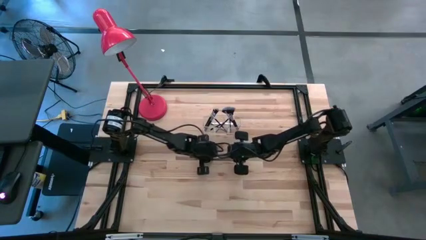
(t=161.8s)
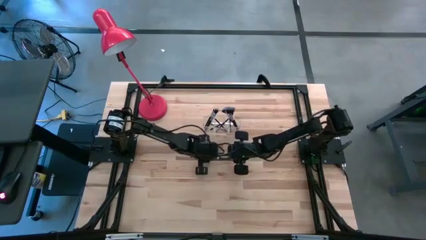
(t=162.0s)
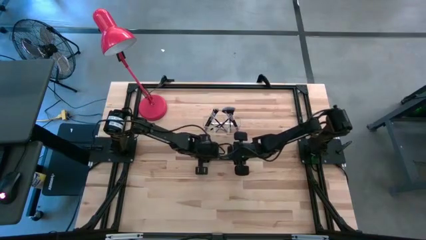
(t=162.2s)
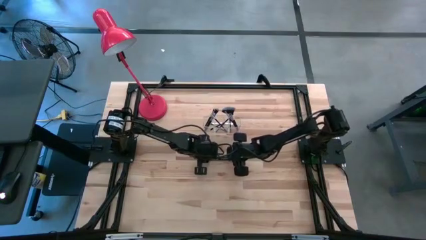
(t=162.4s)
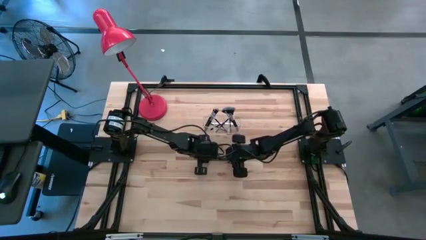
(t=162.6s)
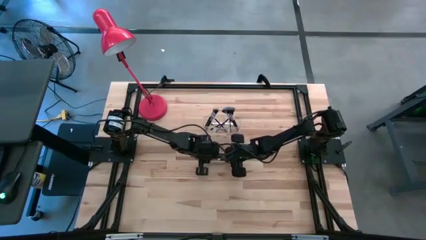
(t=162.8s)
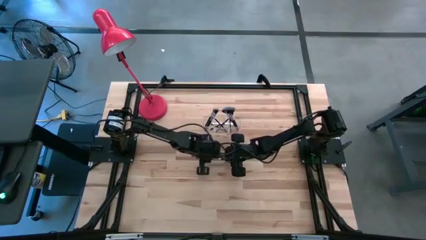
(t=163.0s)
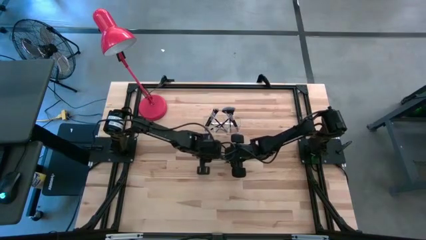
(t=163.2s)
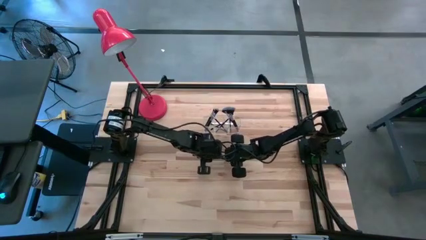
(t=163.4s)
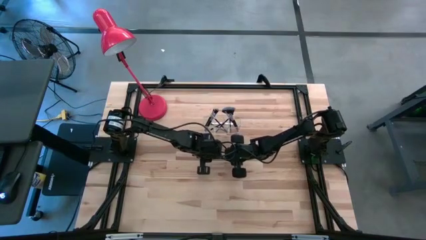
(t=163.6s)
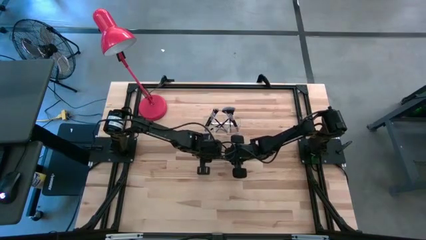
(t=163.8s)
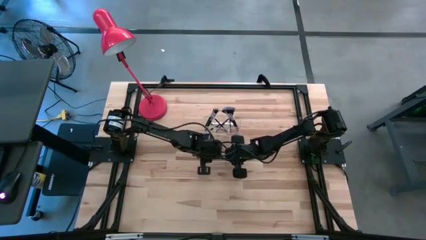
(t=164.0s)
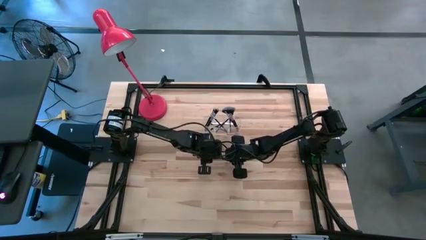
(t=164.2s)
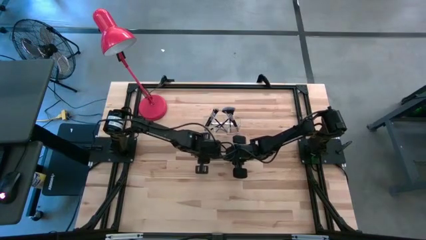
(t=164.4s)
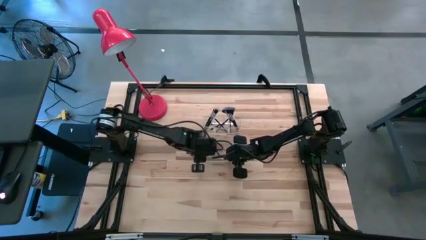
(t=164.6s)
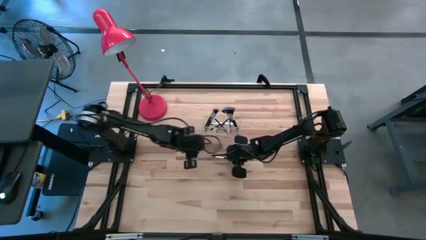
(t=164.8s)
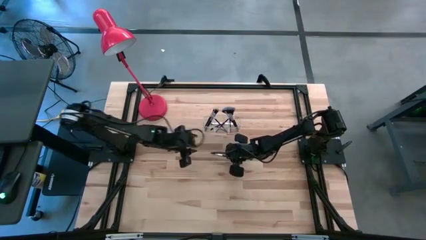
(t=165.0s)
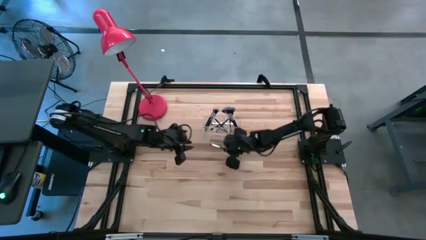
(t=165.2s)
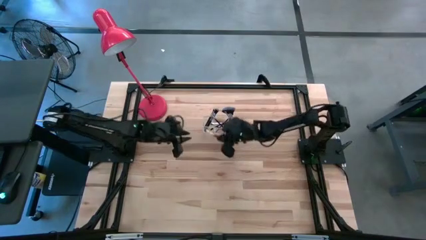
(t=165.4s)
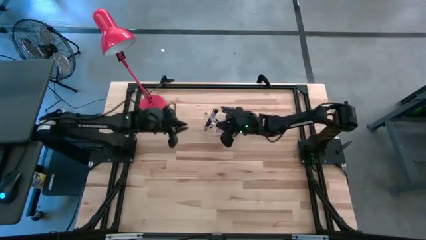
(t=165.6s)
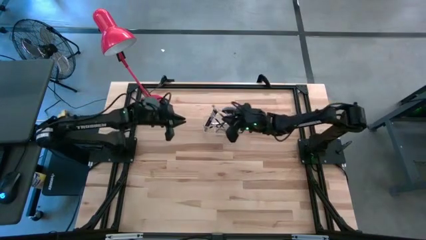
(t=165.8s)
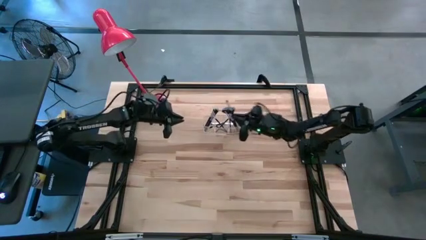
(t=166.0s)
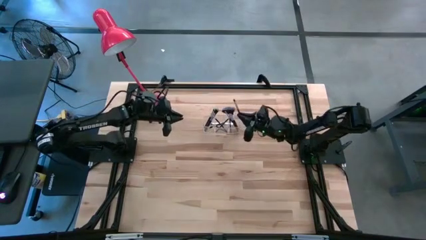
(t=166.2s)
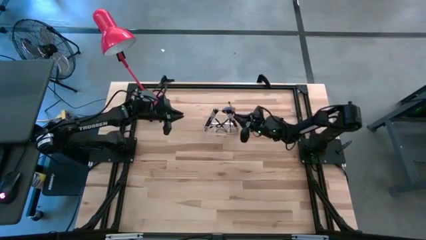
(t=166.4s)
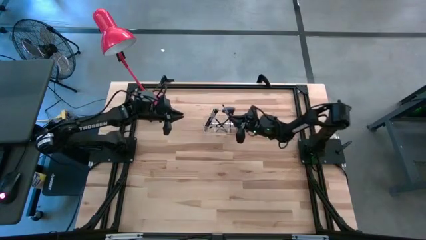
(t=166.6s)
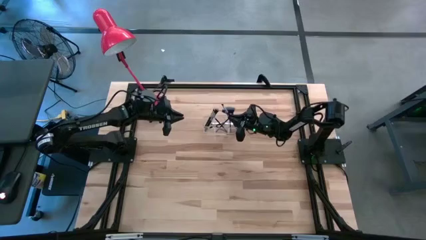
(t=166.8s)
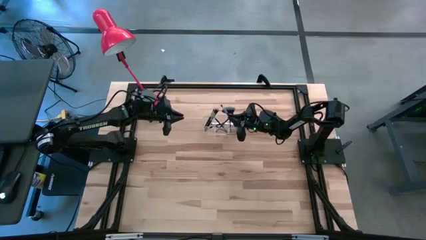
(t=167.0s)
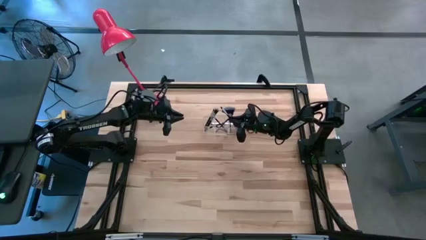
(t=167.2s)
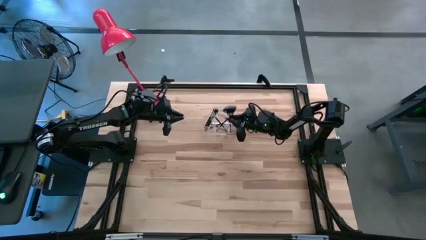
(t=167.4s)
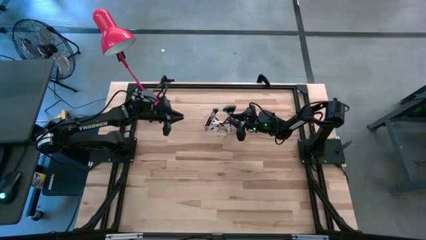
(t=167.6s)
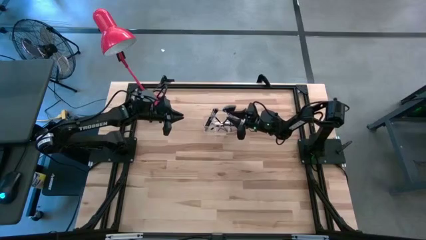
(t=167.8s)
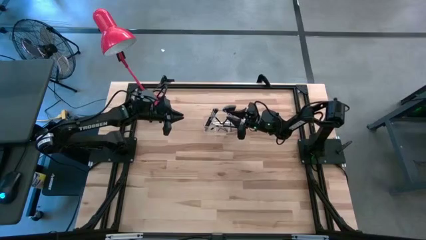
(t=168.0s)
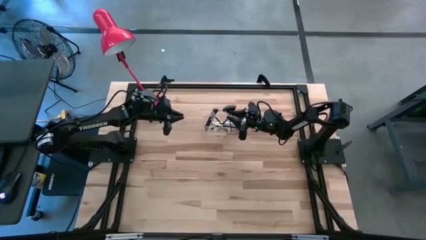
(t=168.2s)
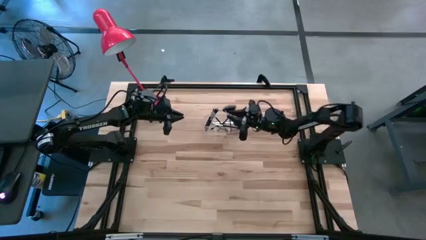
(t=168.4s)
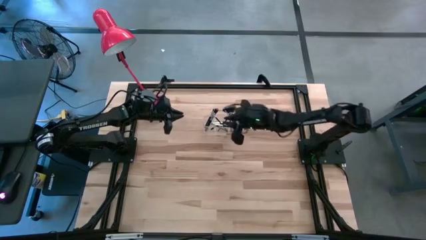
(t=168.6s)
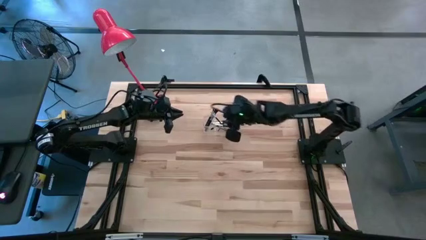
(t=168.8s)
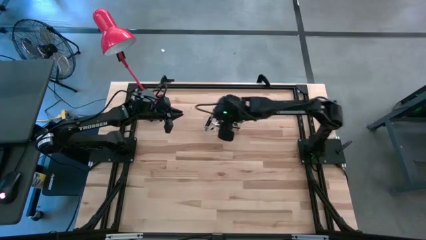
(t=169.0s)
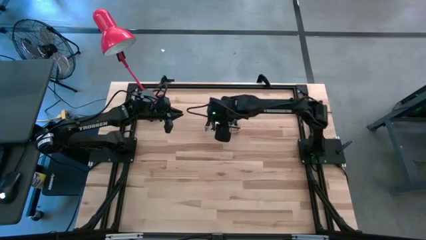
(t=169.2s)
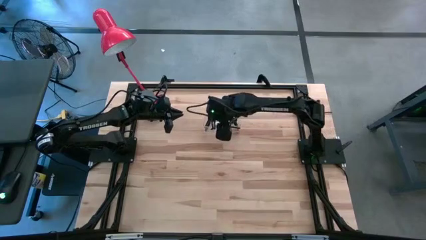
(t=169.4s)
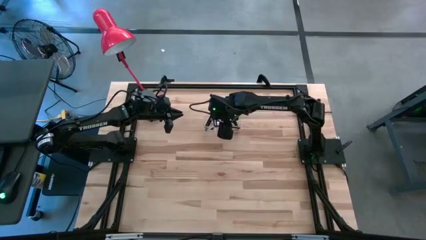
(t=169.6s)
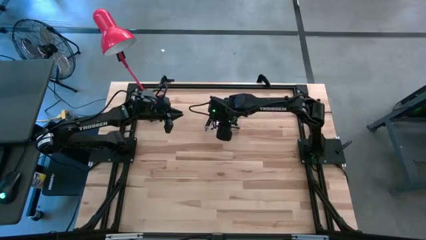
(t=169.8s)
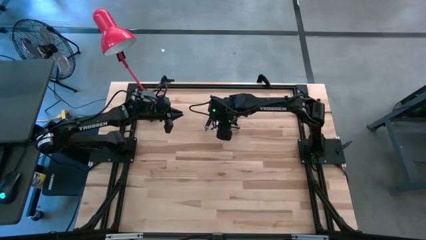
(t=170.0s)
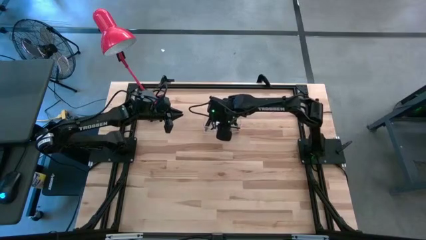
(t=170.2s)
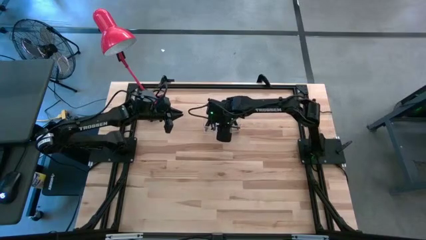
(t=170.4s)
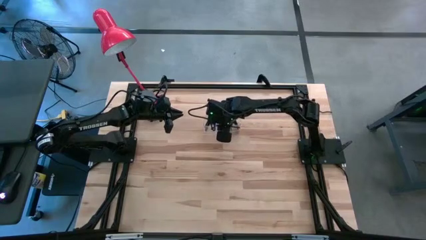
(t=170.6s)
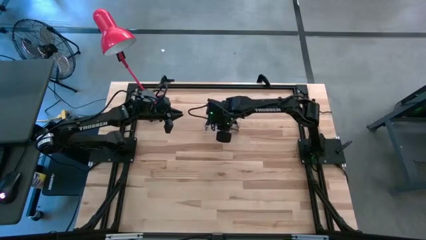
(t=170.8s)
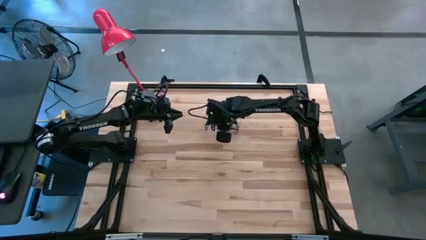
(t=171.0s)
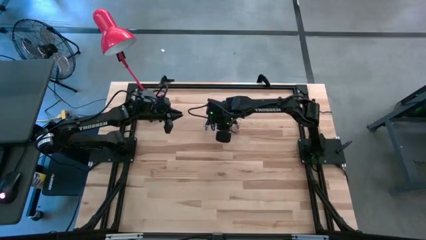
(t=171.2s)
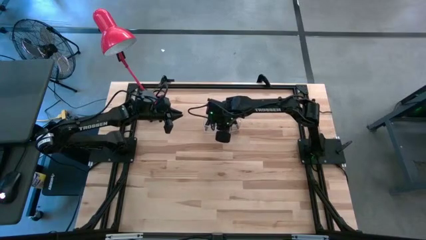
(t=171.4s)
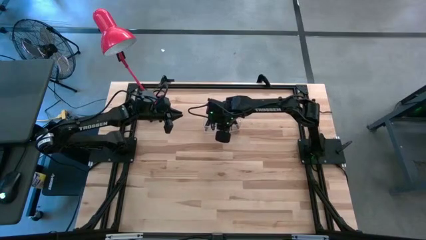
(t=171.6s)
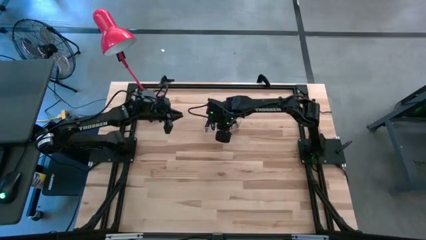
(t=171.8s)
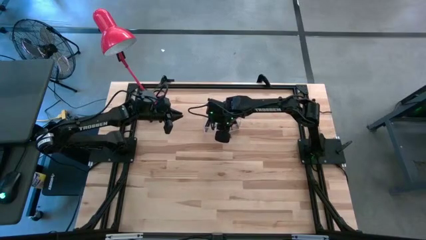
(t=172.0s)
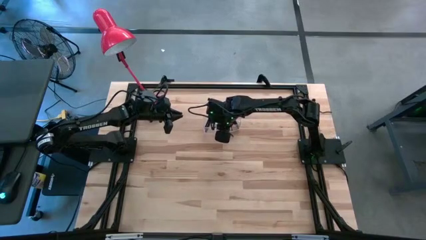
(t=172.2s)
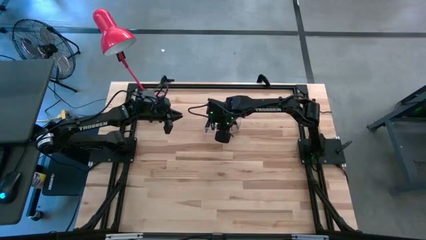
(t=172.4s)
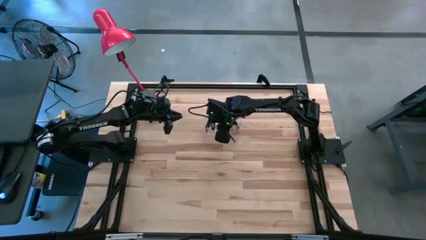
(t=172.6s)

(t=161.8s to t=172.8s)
Task: Pick & Place Makeup Supplies
Put the makeup brush into the transparent organizer

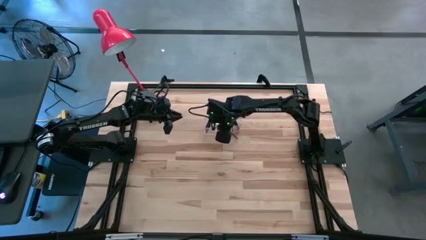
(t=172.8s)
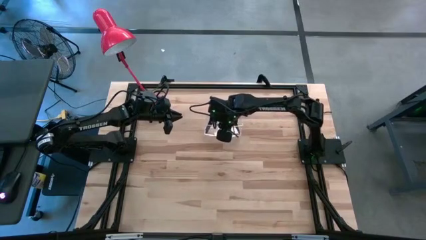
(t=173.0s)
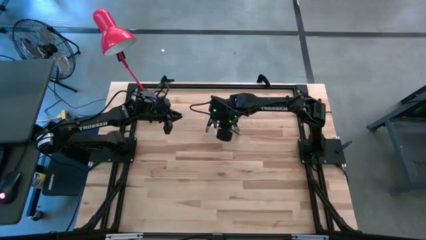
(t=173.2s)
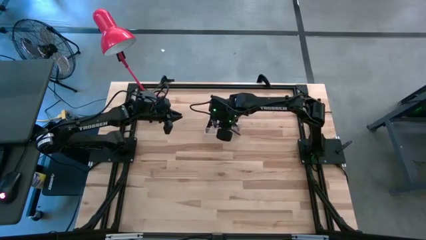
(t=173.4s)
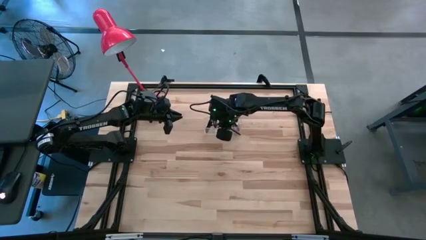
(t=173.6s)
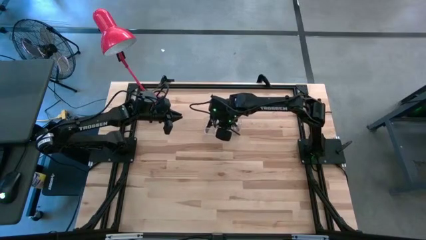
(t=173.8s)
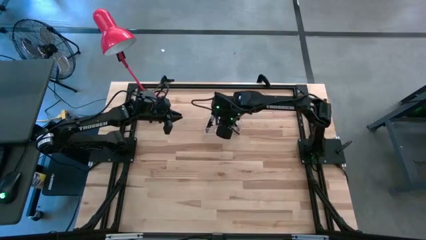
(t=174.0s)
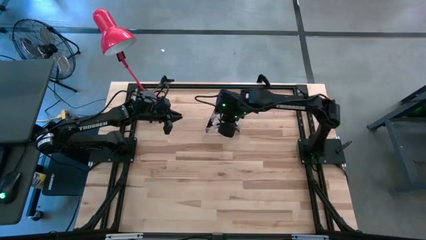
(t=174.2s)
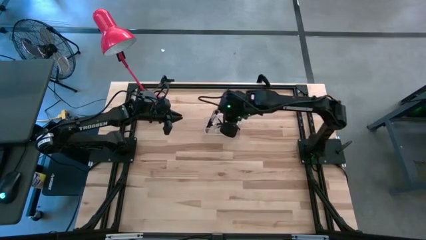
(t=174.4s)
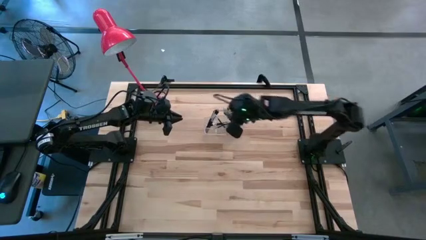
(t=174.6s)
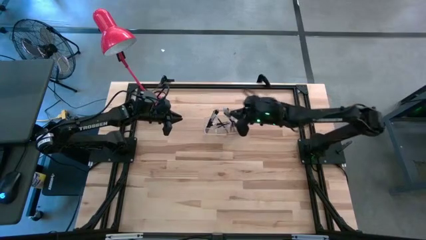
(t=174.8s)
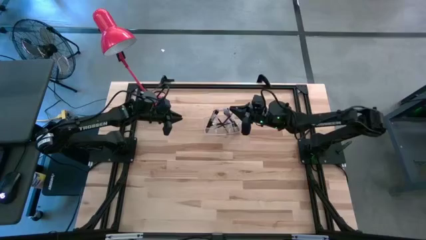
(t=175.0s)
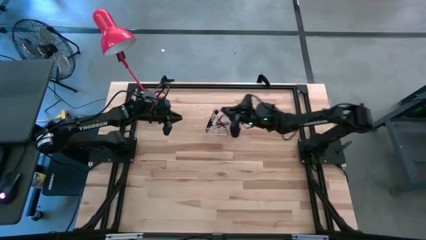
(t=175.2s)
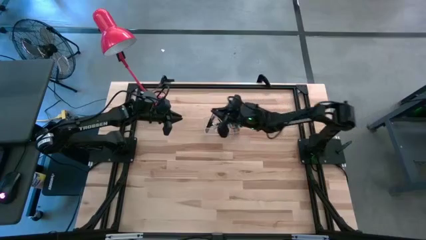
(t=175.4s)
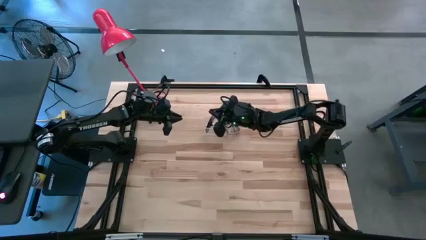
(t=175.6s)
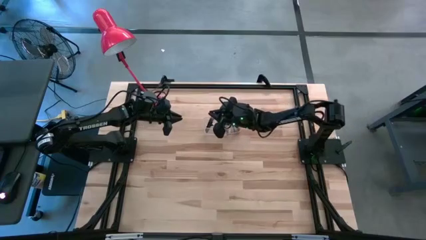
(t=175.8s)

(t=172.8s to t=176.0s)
Put the makeup brush into the transparent organizer

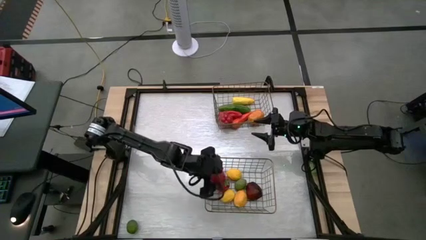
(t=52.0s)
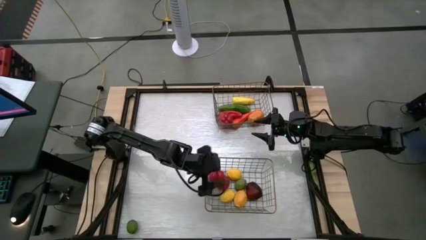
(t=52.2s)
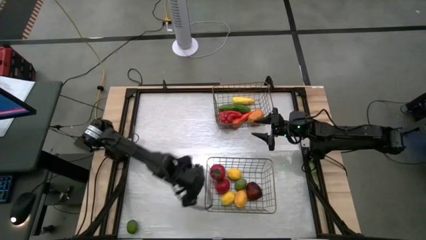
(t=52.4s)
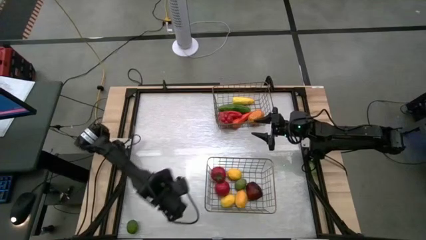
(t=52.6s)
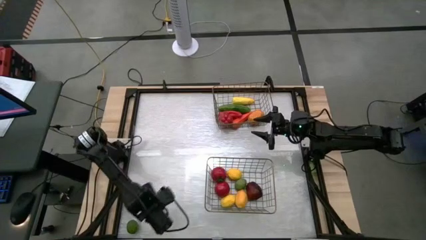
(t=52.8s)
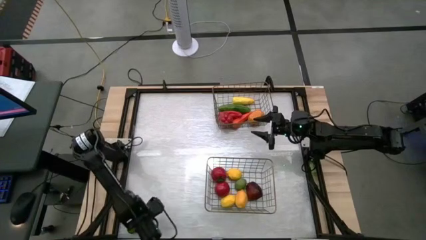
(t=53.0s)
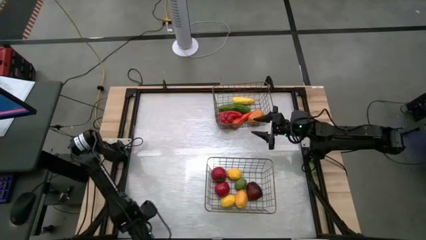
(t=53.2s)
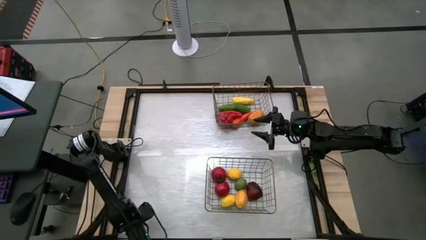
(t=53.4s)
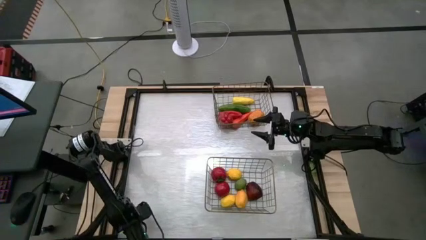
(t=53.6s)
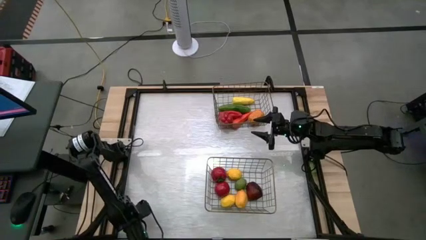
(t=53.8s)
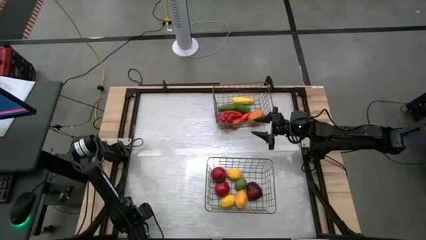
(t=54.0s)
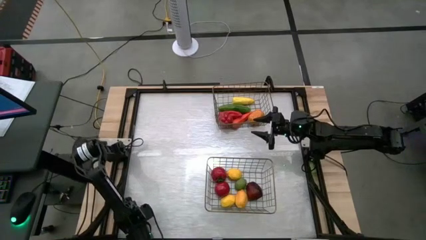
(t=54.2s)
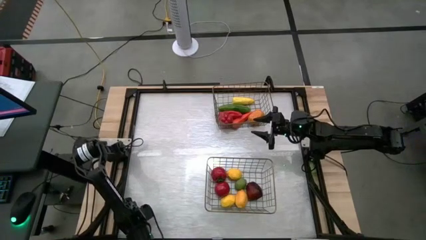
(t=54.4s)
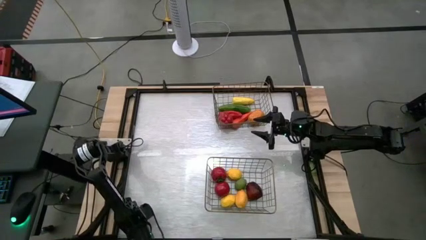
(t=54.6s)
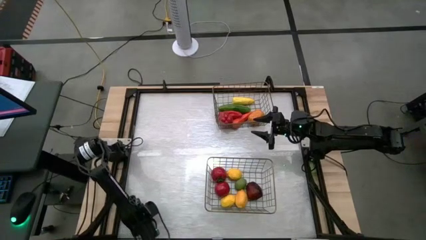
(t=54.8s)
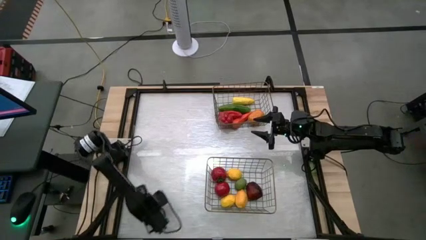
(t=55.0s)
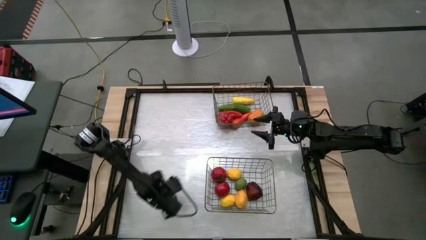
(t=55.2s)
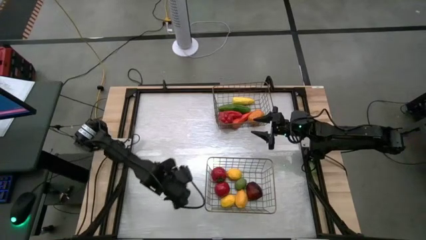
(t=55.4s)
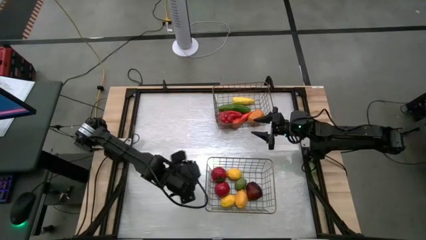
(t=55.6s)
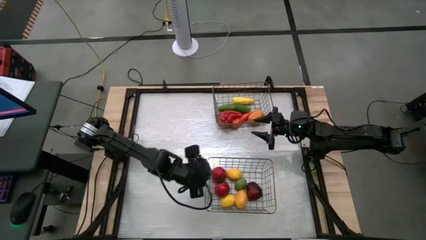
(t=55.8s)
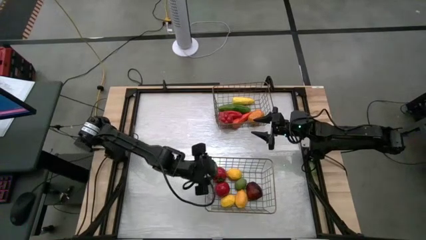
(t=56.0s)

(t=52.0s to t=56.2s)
Task: Sort produce into baskets
Put the green lime into the bottom wire basket
